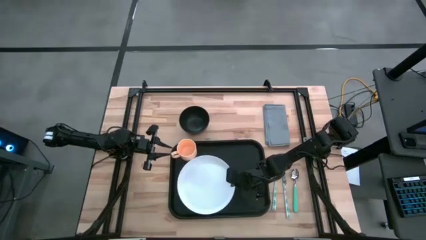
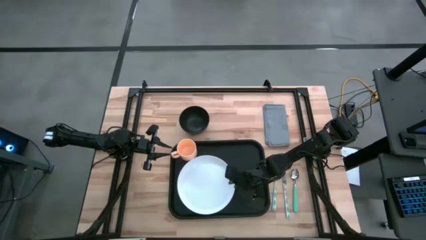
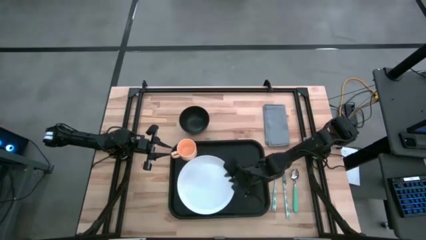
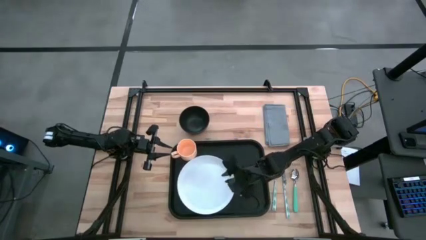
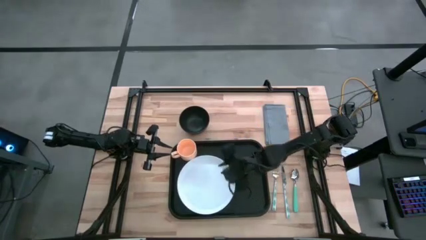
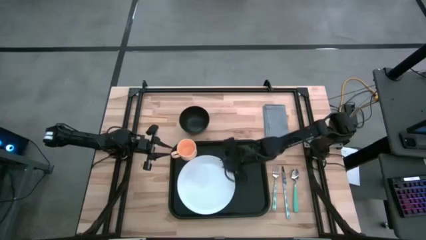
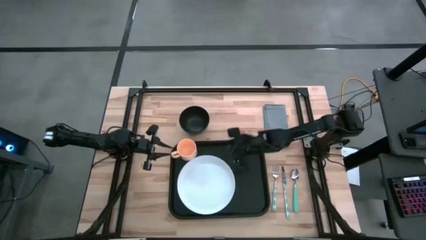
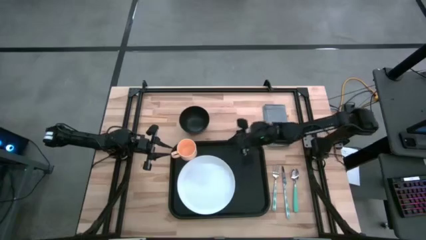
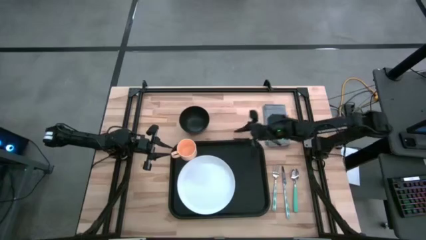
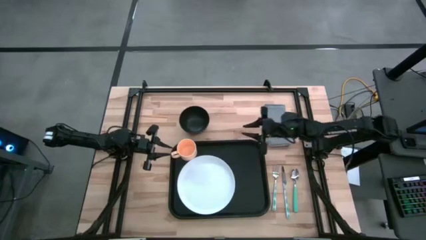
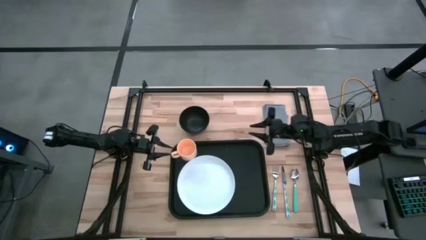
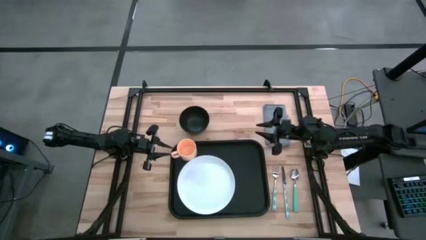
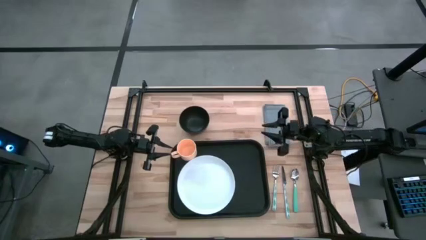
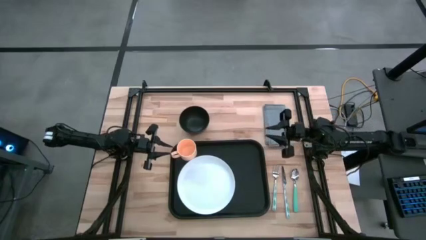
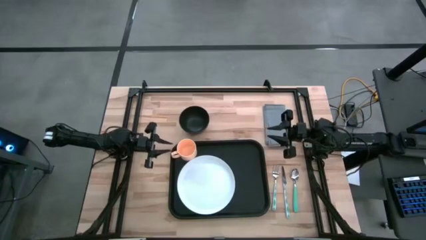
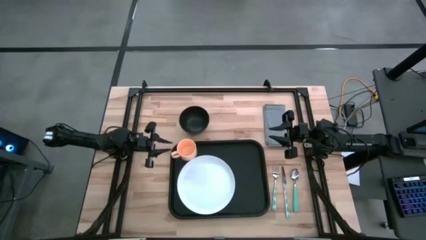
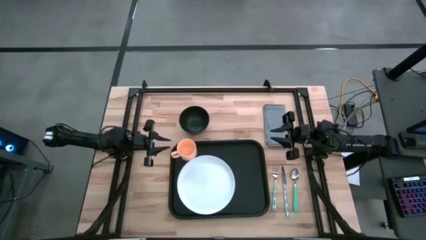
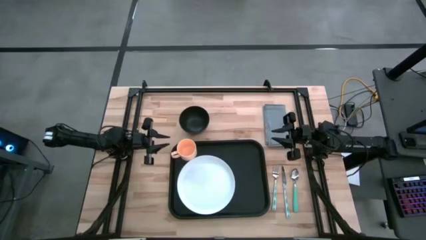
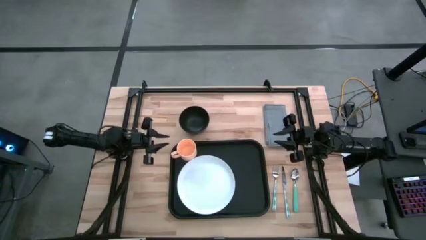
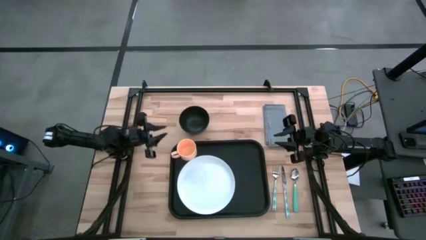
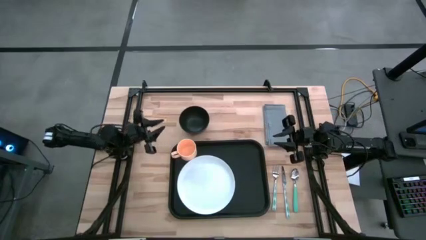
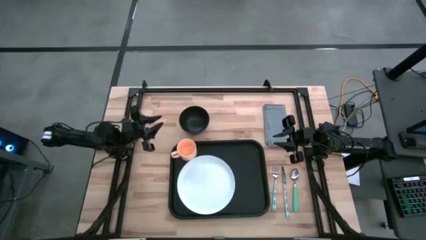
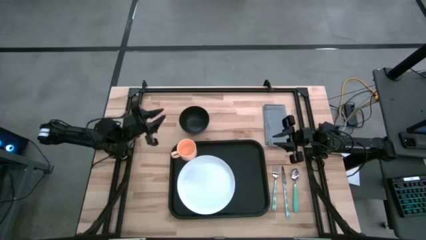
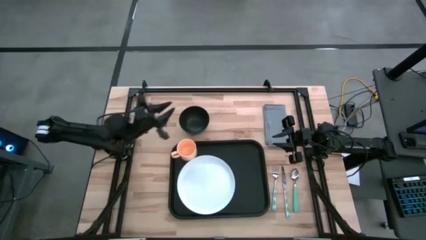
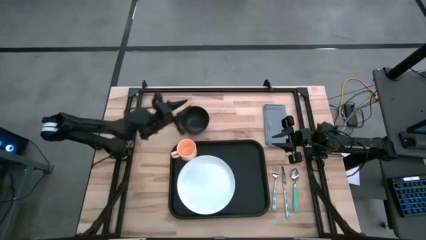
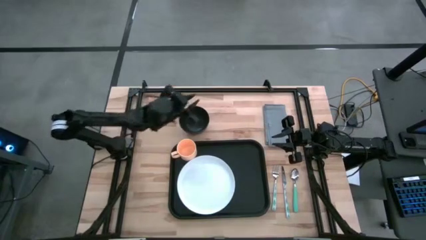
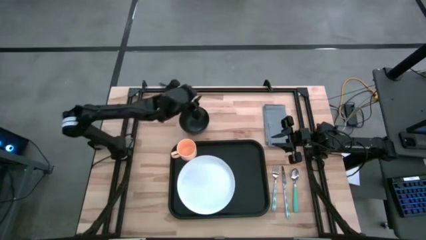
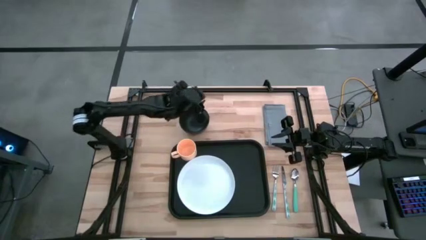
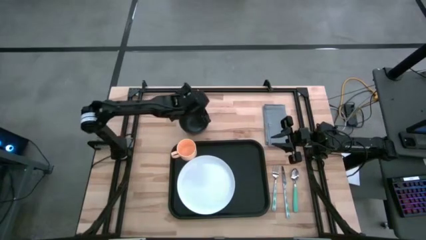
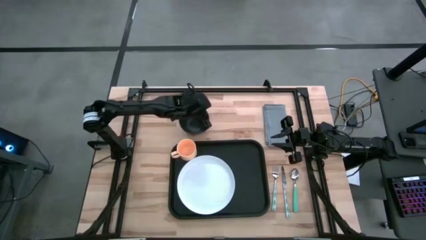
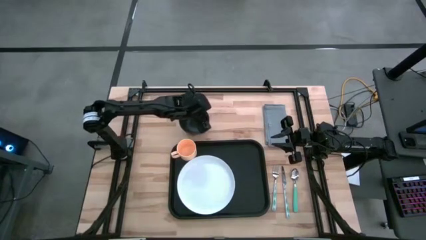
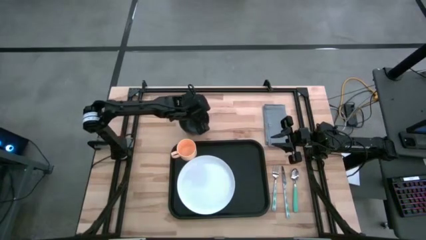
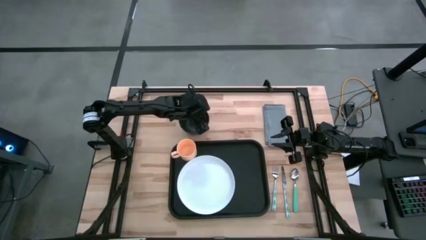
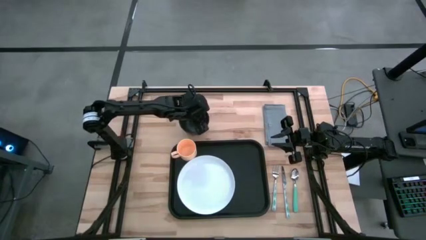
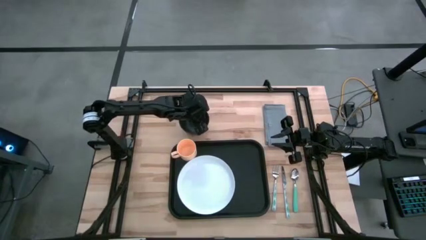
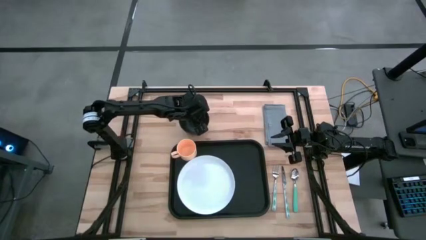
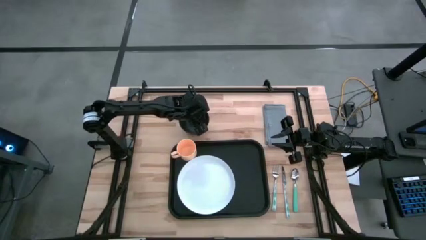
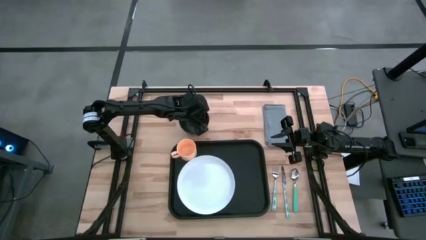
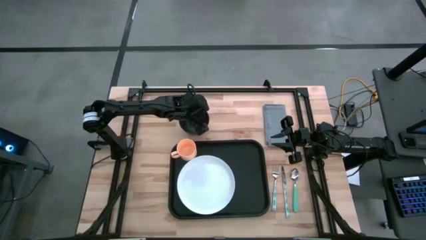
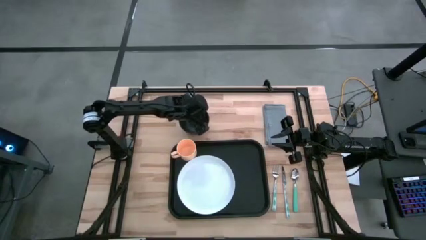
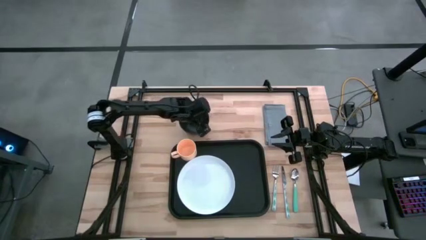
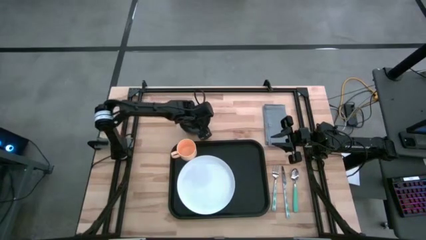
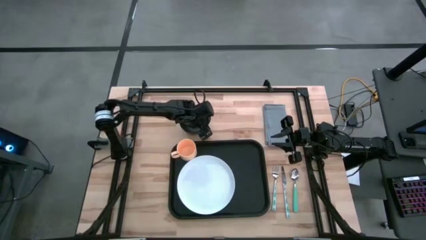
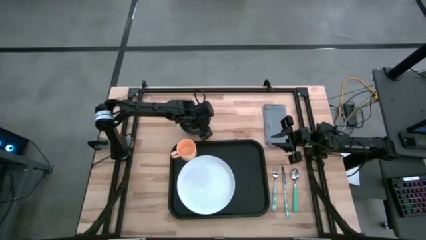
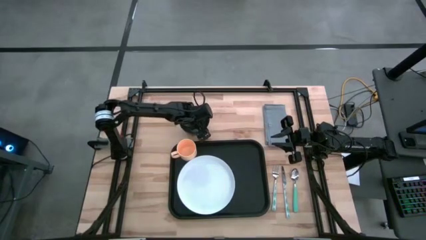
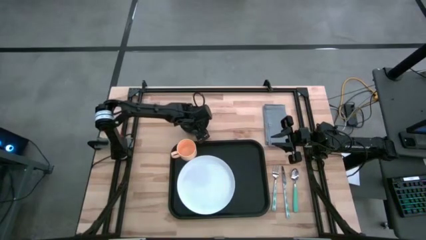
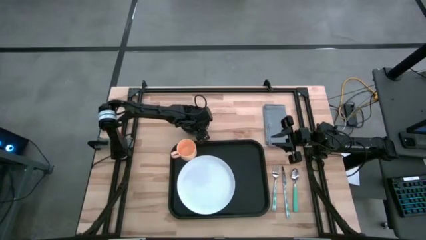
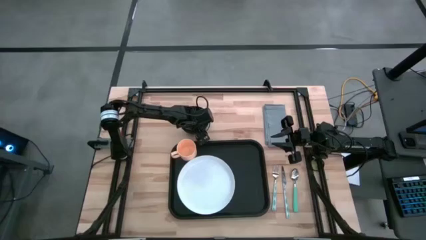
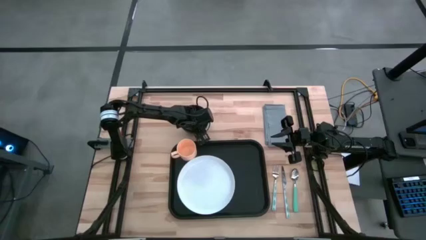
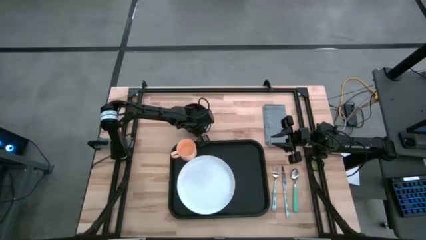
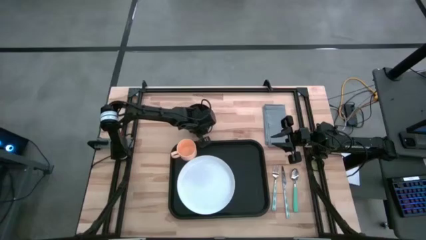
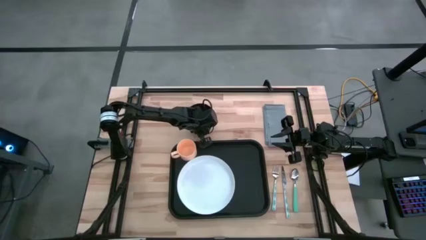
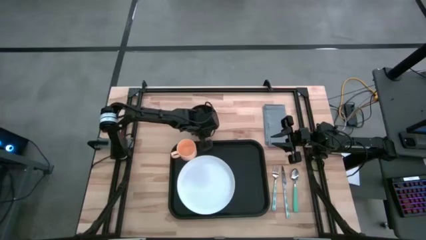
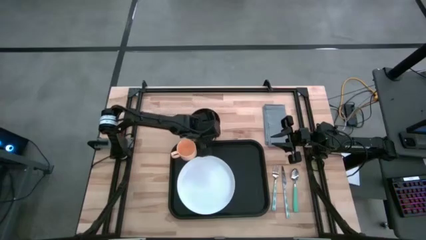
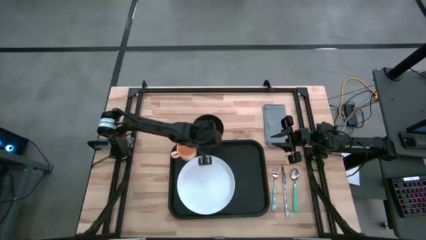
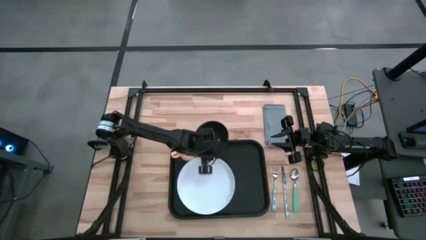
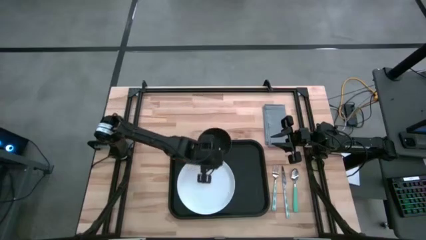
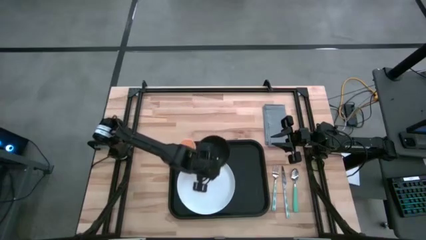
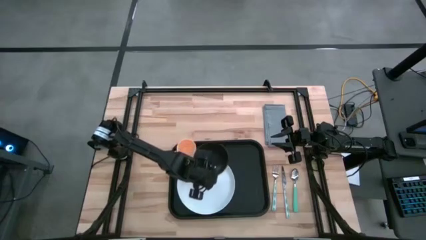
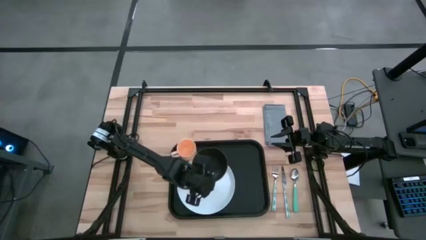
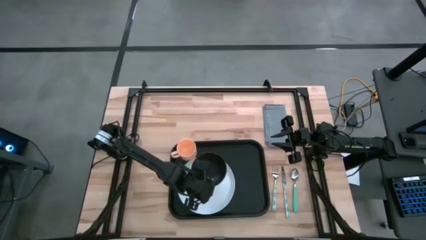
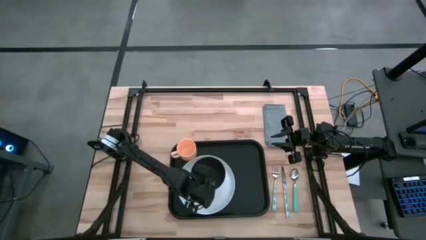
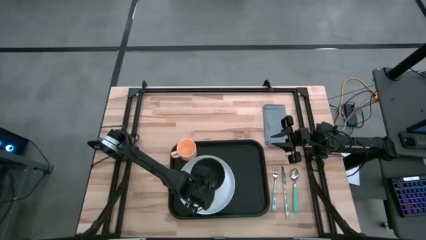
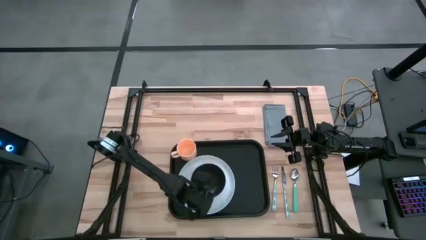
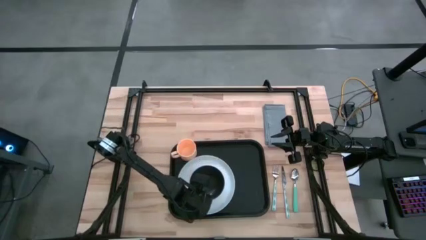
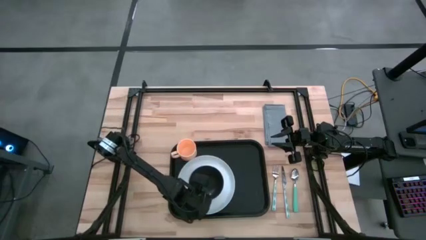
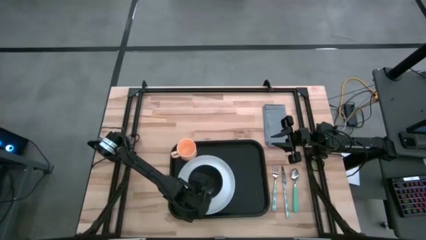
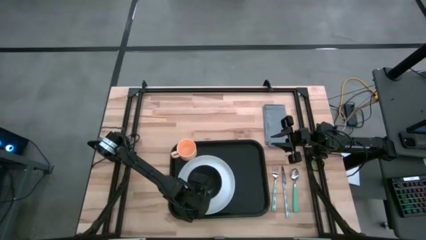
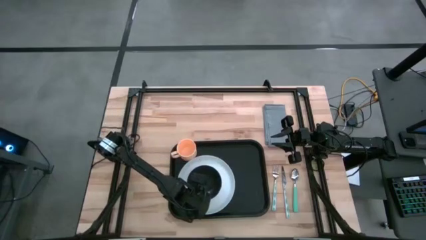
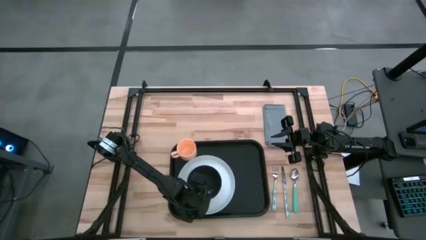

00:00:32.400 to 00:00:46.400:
Task: Set up tray
Stack the black bowl on top of the white plate

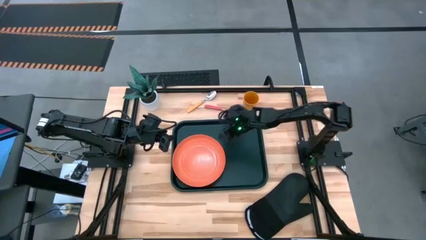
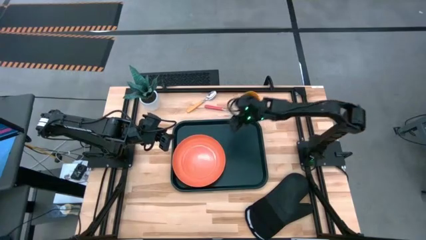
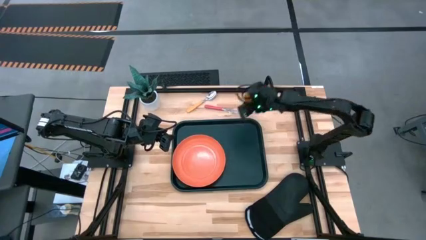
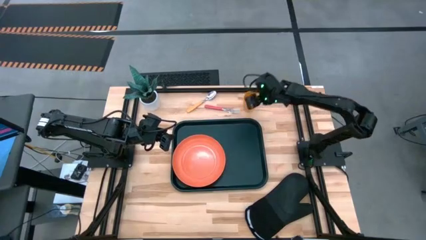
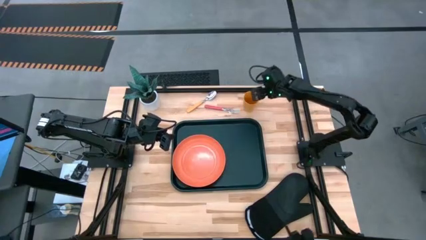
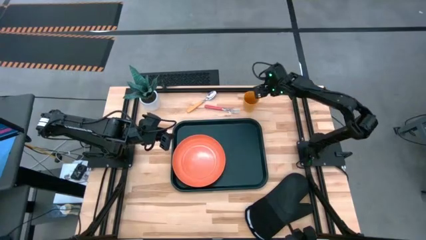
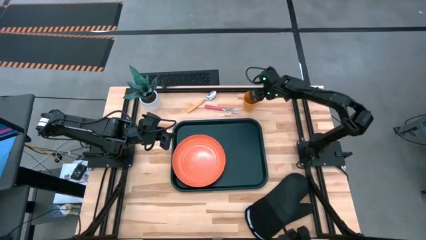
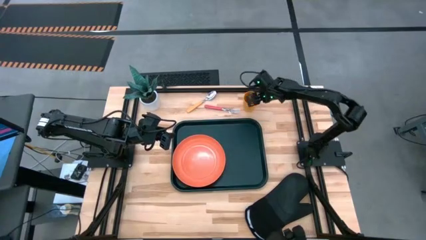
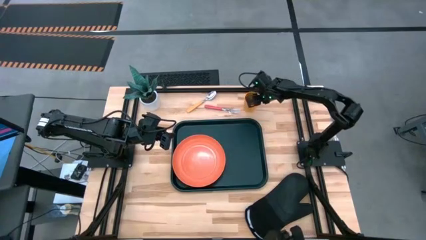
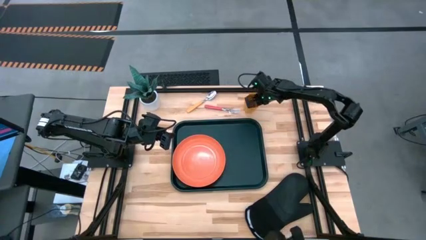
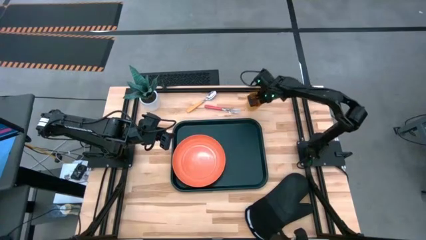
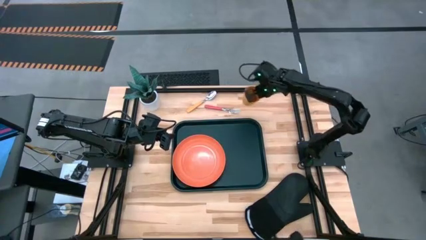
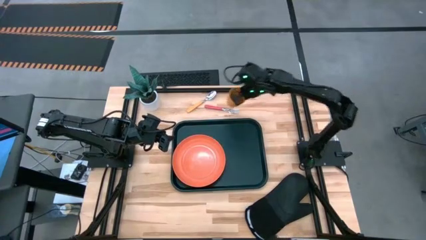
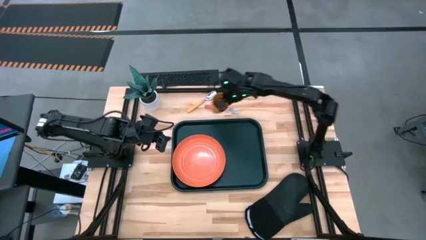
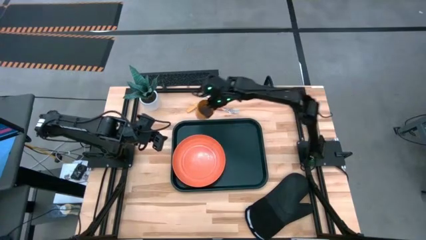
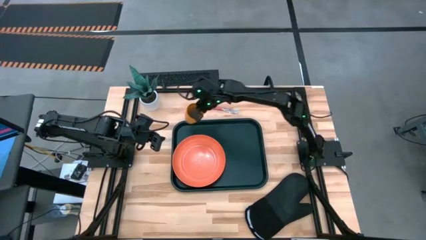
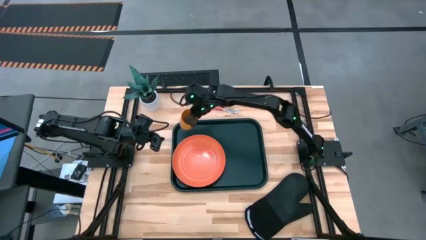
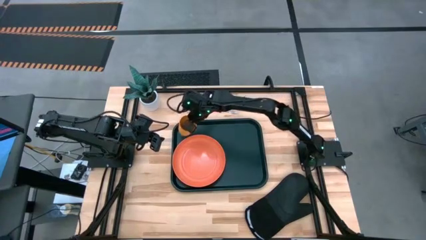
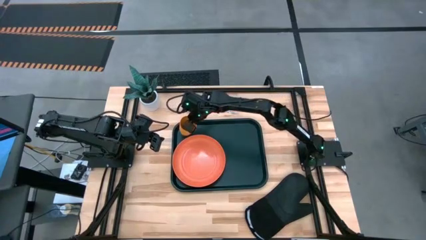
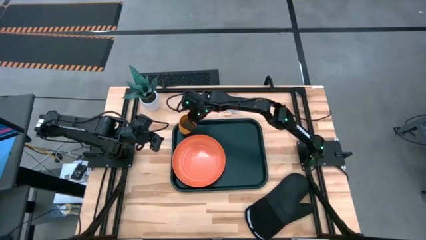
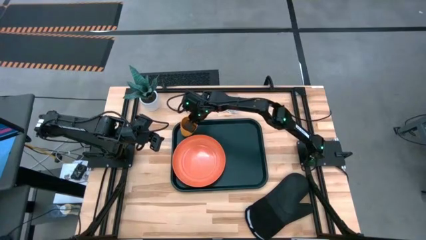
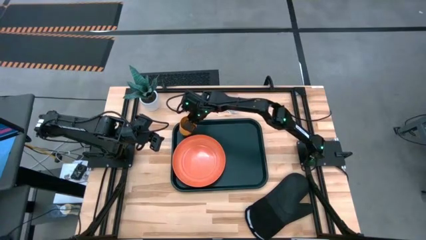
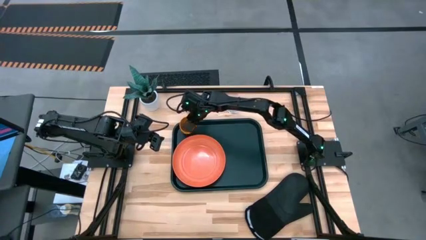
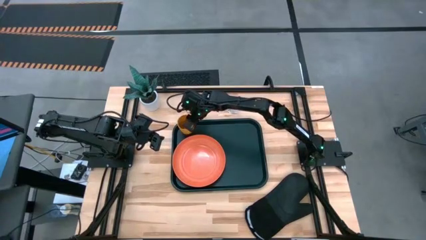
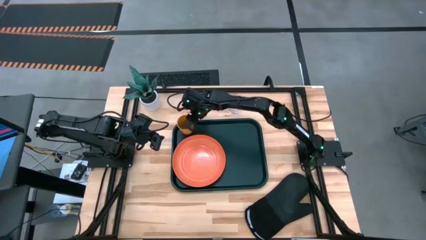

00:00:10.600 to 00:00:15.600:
Task: Pick and place plate/cup/fork/spoon on tray
Put the yellow cup on the black tray to the top of the orange plate
